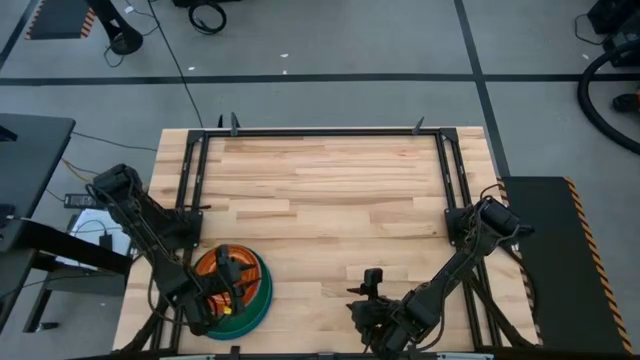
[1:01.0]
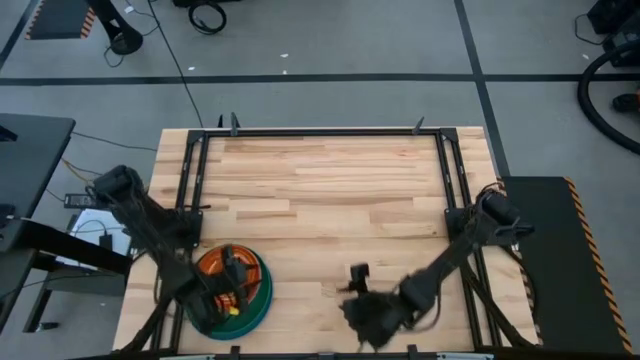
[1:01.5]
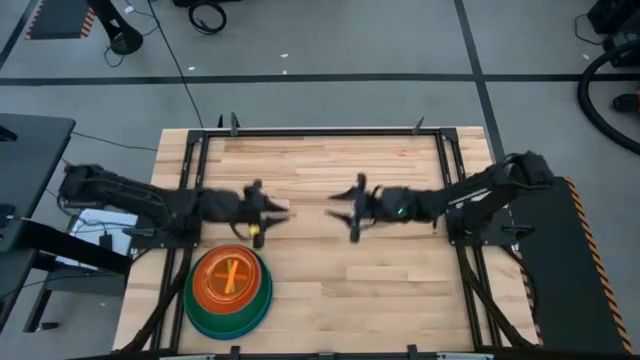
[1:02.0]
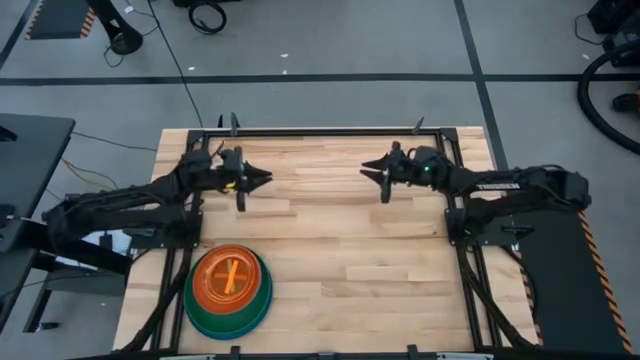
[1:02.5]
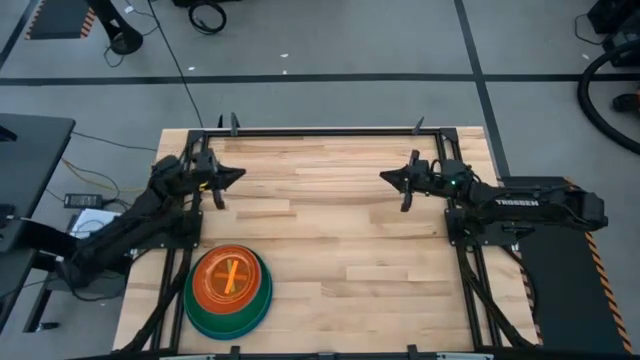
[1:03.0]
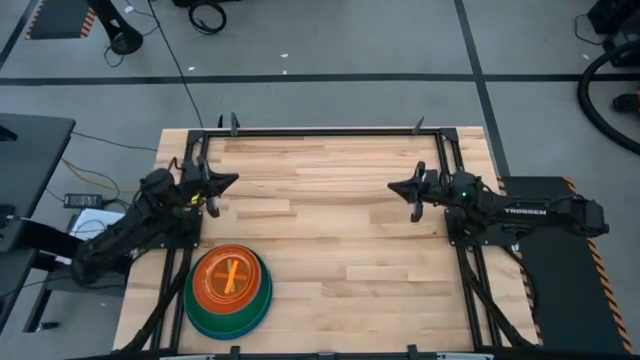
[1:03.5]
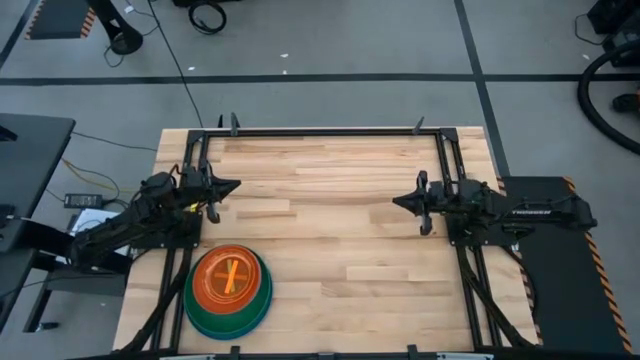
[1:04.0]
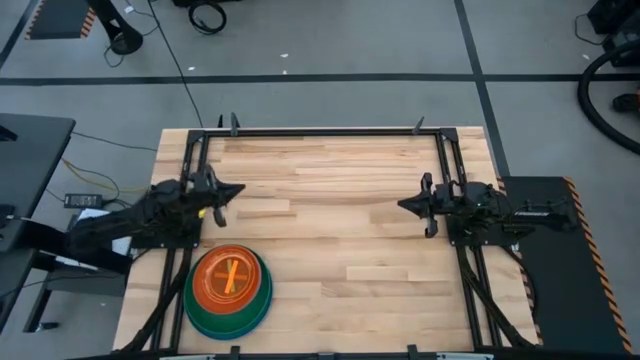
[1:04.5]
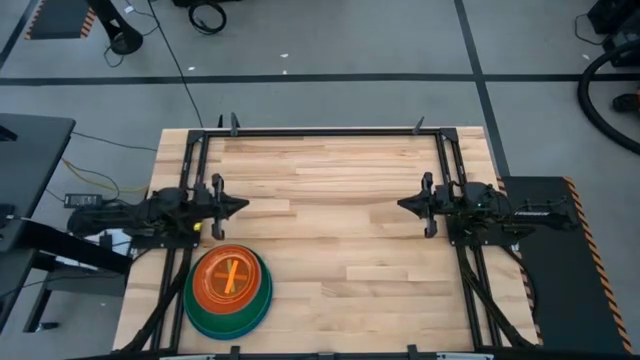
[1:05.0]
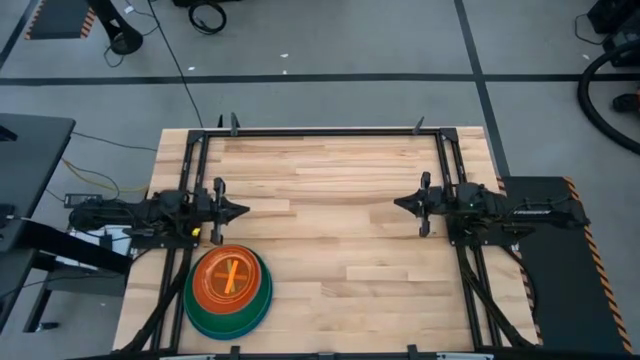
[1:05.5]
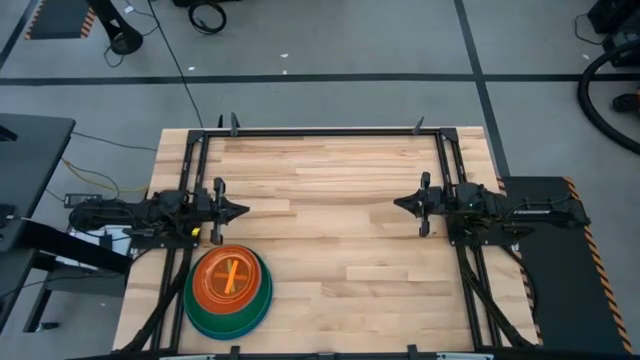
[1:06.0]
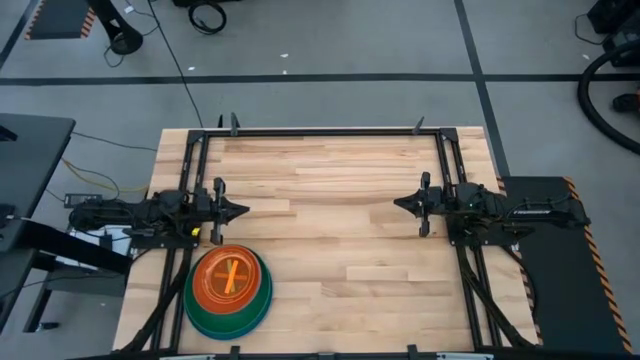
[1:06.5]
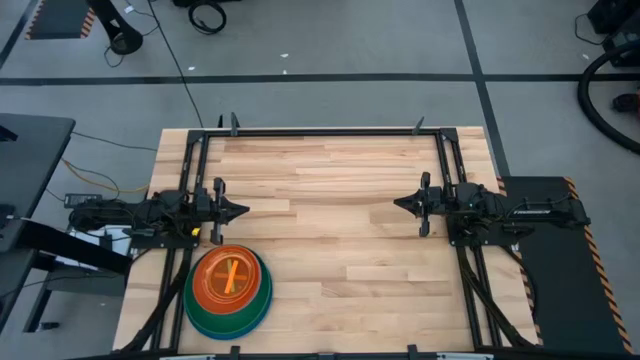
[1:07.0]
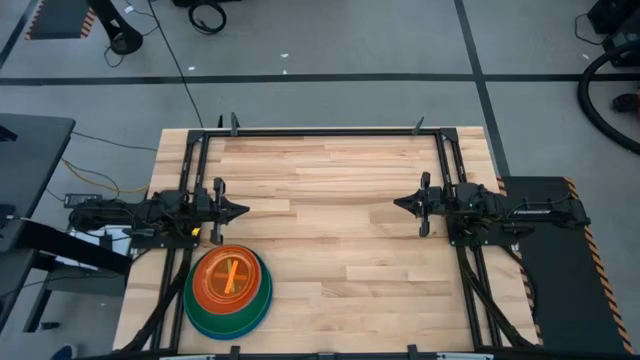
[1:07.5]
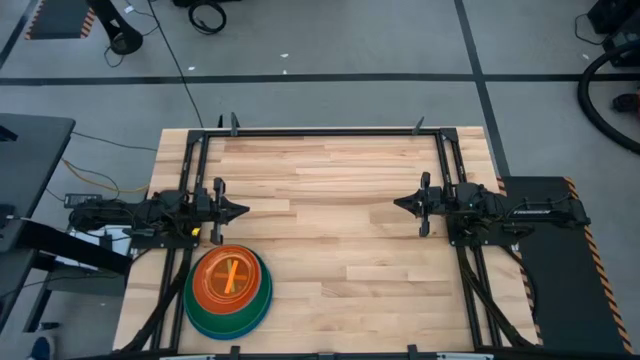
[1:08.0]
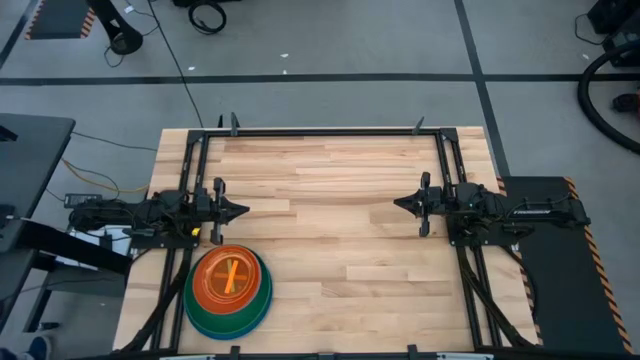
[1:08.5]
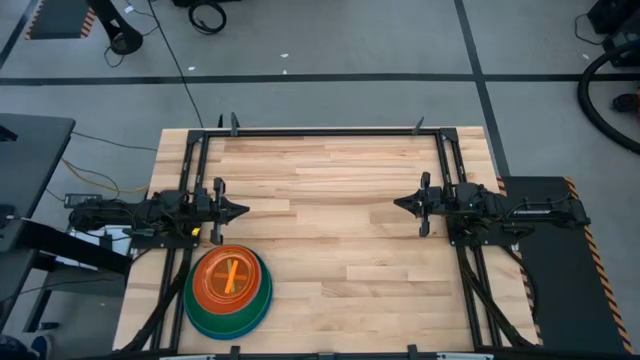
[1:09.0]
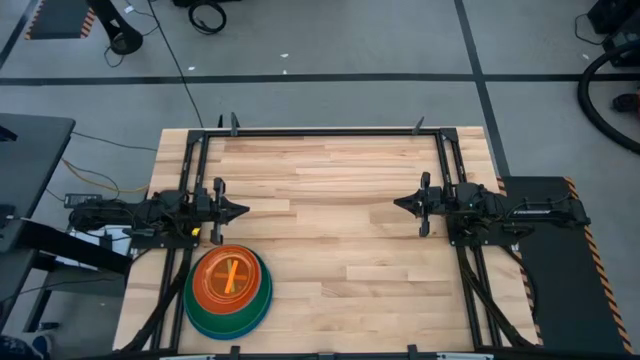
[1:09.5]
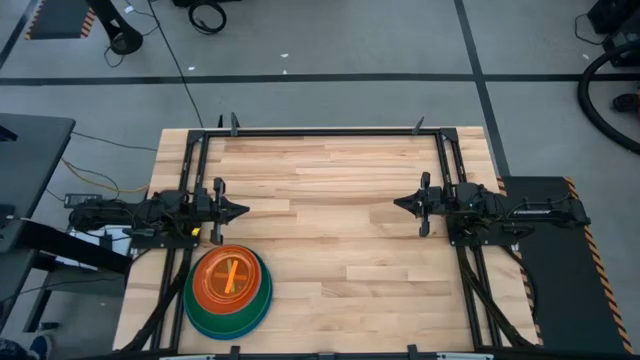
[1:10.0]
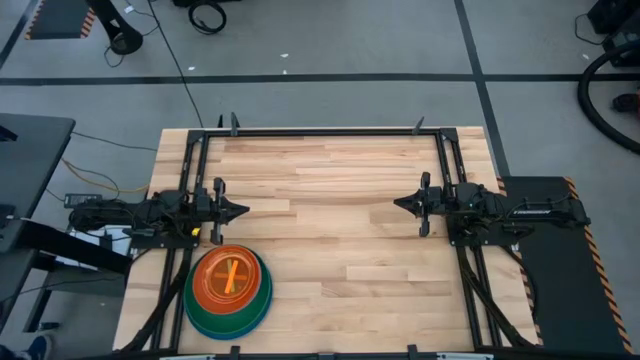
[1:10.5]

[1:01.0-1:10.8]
Task: Stack plastic plates
Return to Home Position

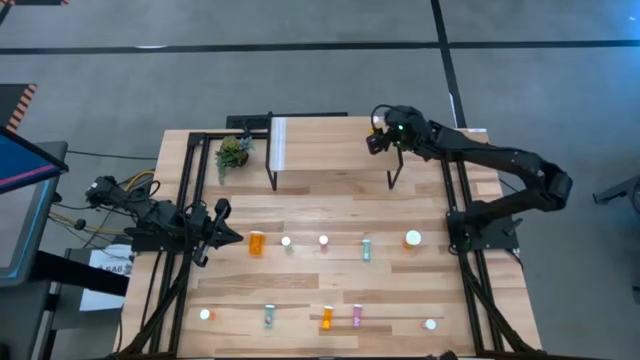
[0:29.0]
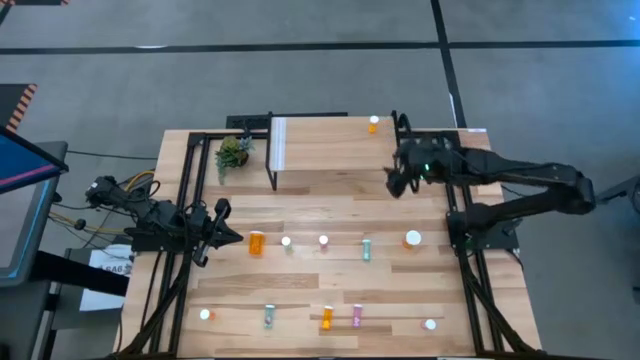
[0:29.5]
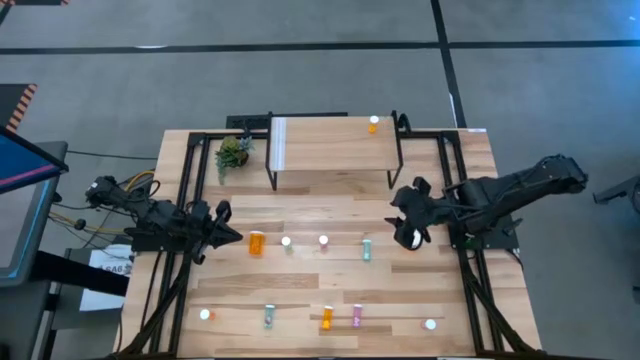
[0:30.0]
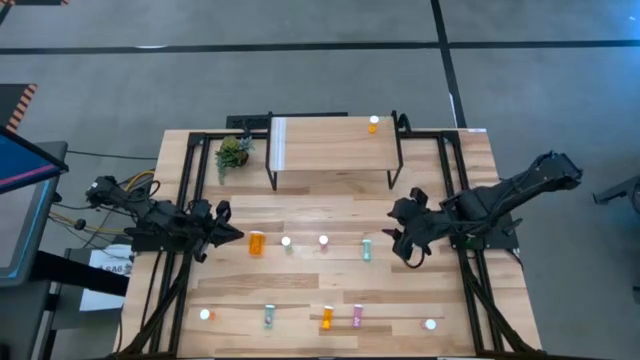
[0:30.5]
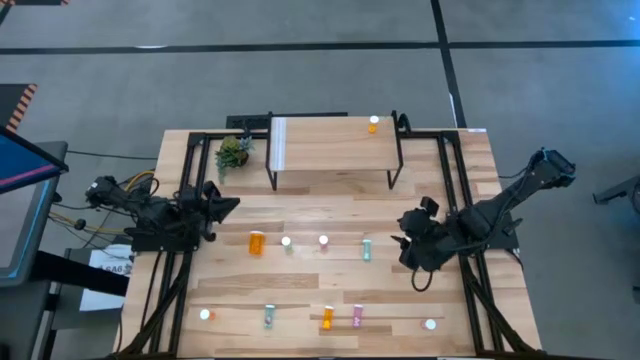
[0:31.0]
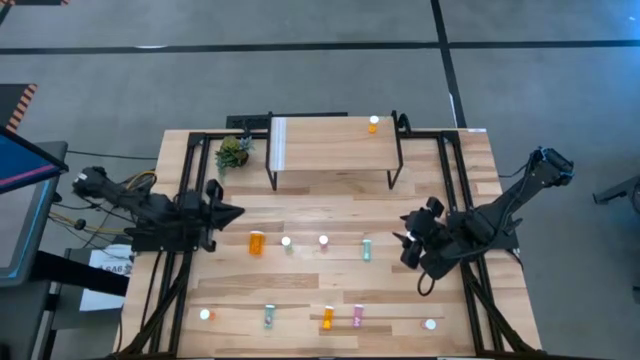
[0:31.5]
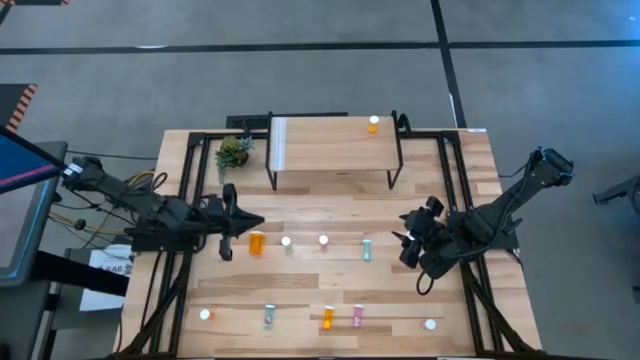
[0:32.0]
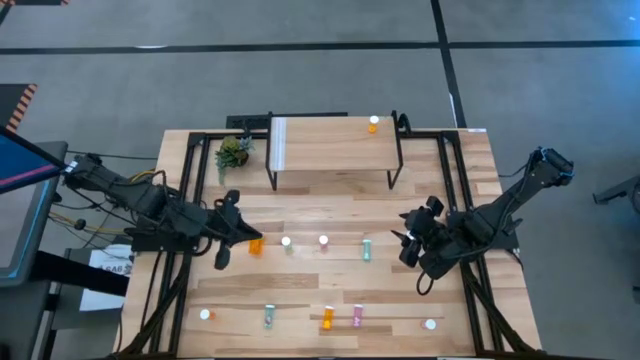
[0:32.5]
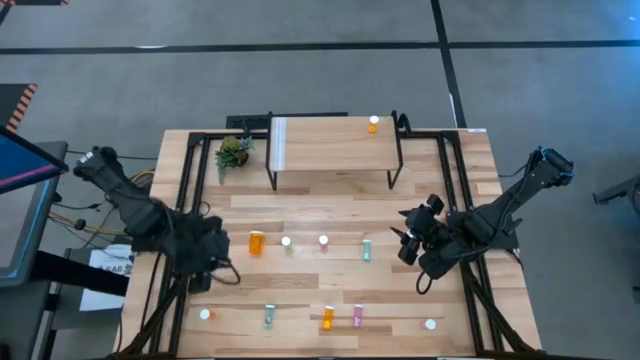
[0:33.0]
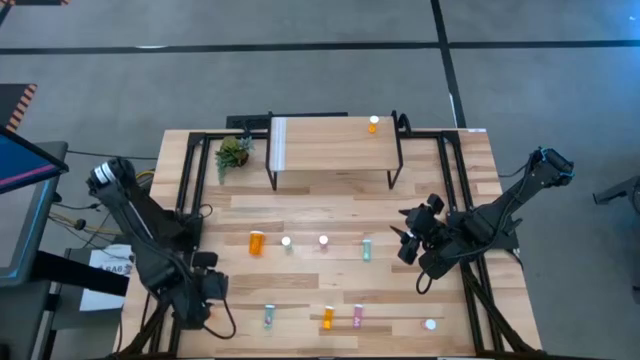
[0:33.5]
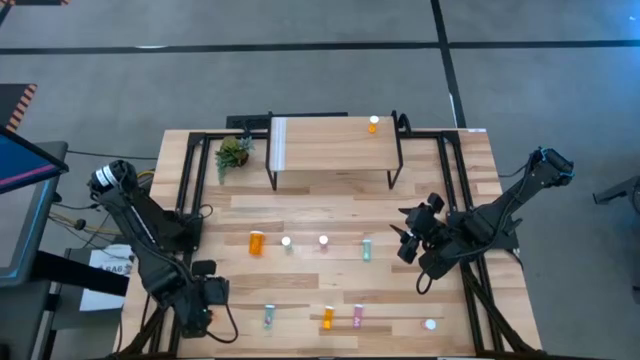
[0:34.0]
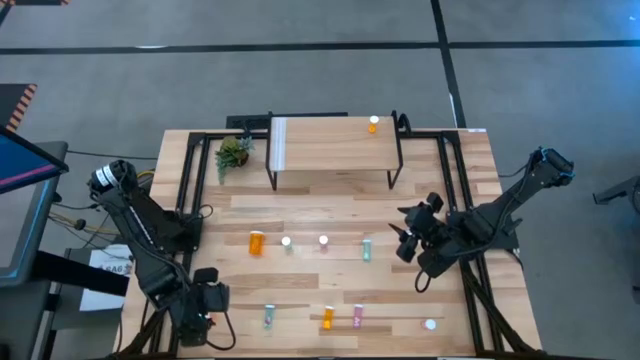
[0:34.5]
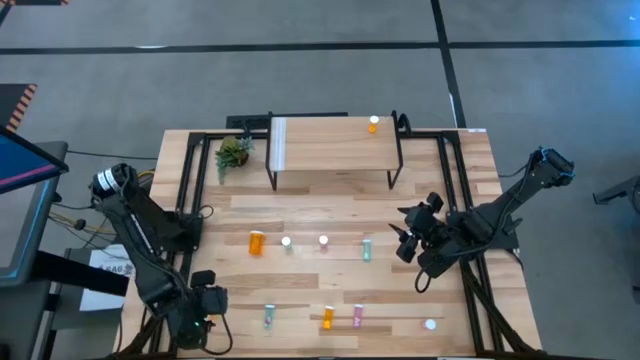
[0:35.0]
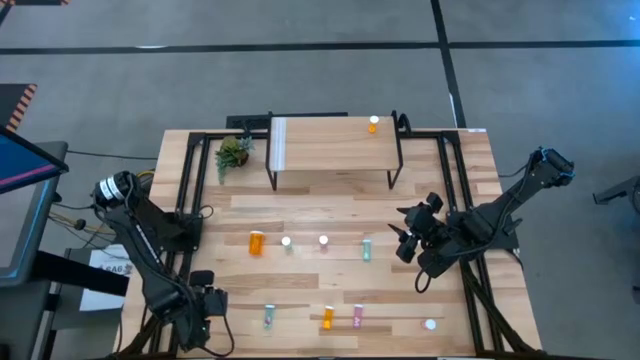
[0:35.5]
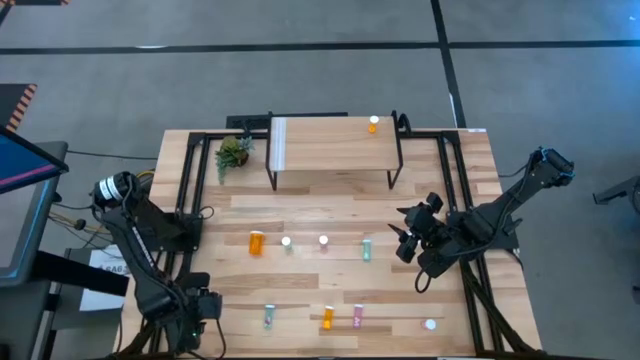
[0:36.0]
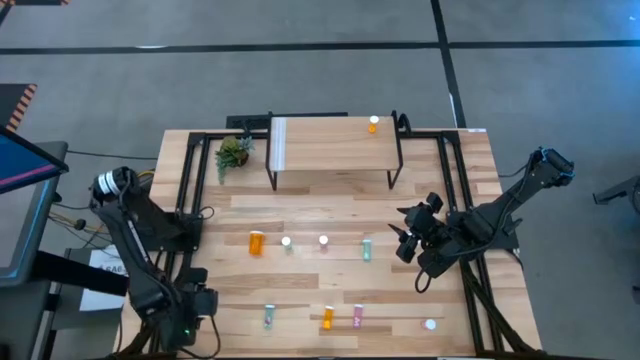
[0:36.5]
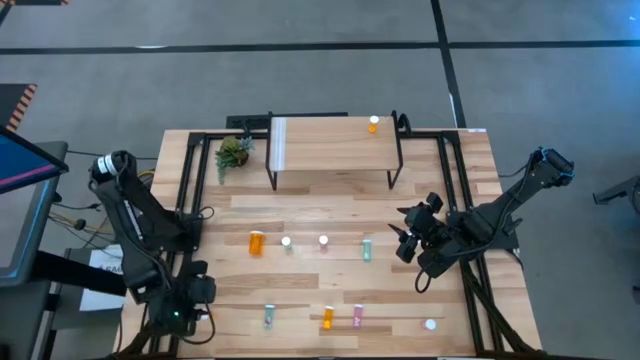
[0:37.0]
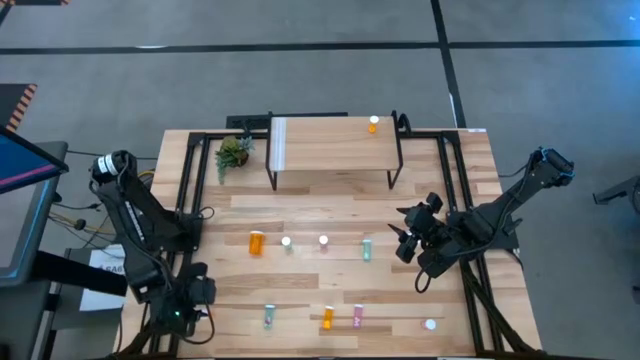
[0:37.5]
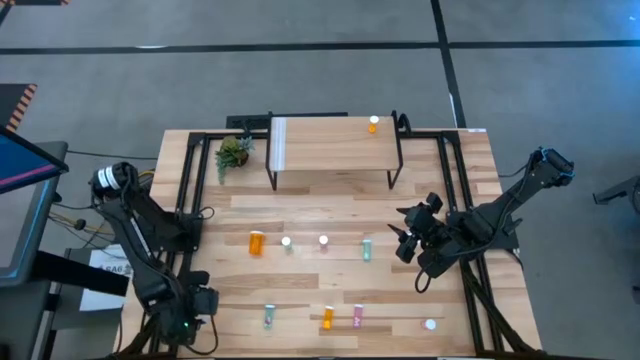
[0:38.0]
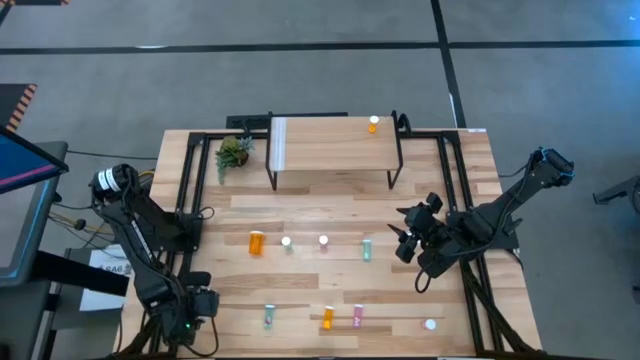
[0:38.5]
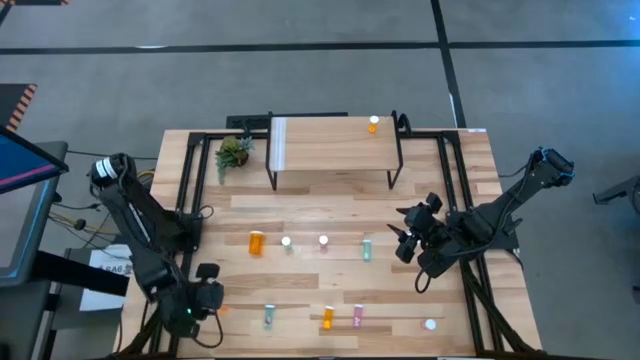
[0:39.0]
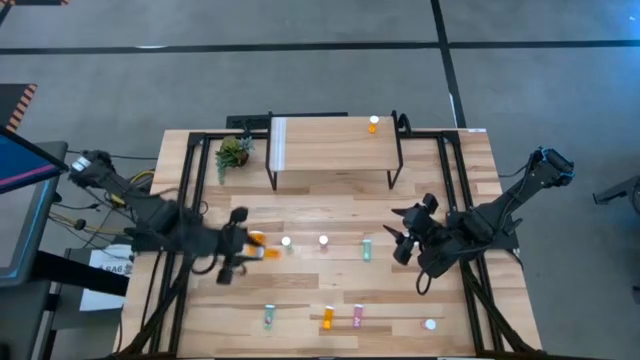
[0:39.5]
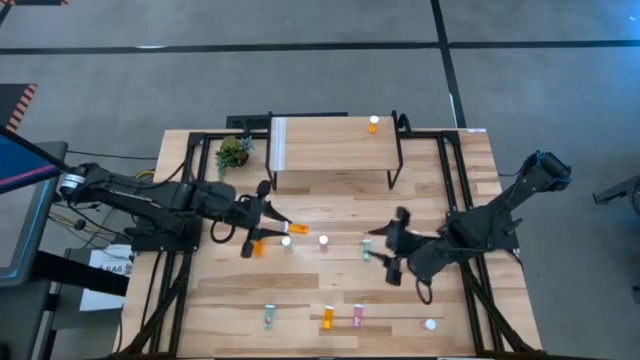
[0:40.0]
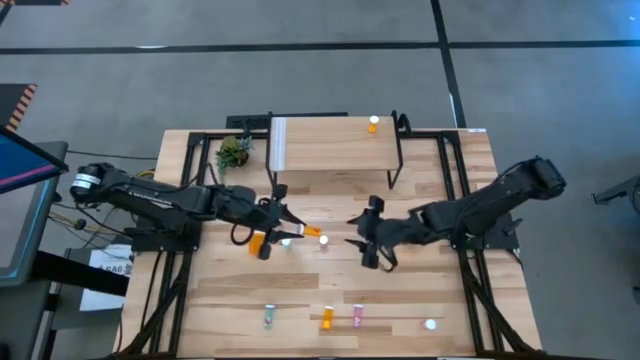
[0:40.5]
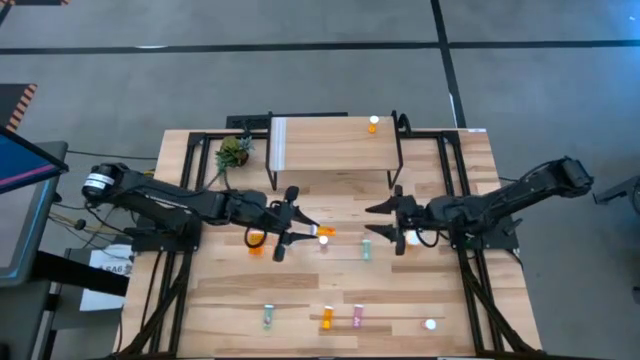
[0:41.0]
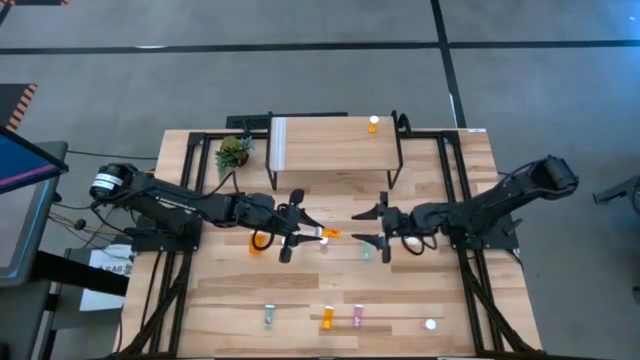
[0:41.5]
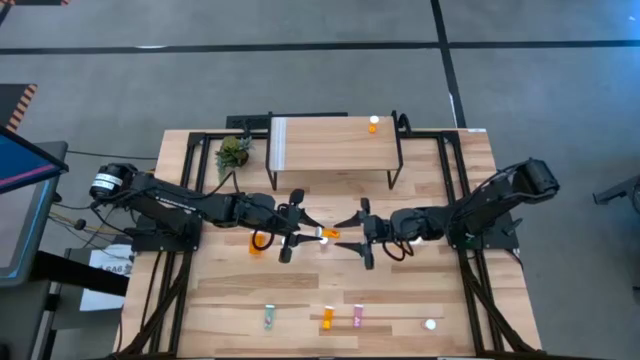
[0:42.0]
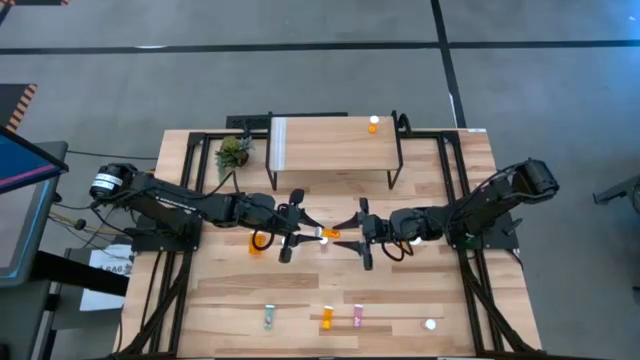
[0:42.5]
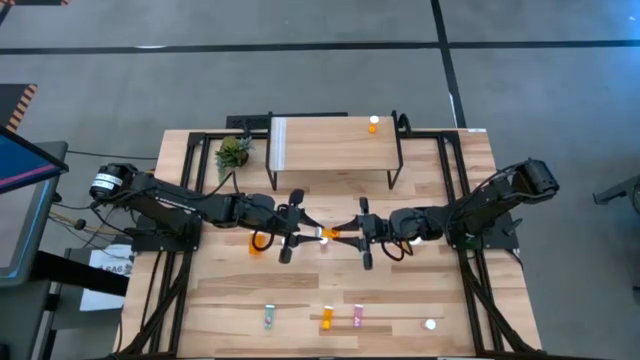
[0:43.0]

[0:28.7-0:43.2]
Task: Pick and place medicine bottles onto shelf by color
Put the left small orange pill bottle on the shelf aligned with the other small orange pill bottle
